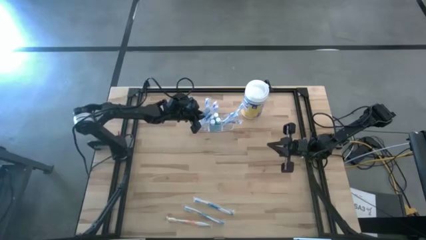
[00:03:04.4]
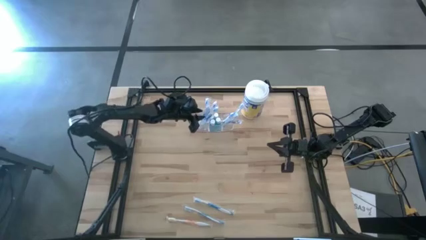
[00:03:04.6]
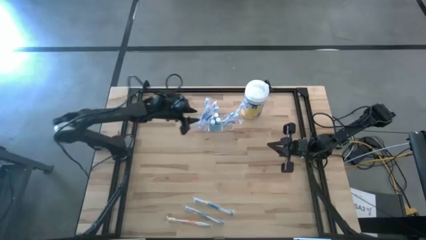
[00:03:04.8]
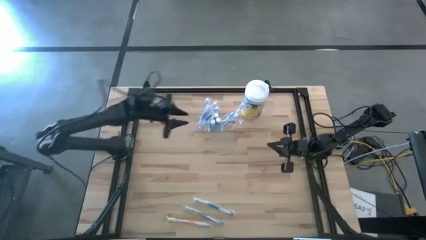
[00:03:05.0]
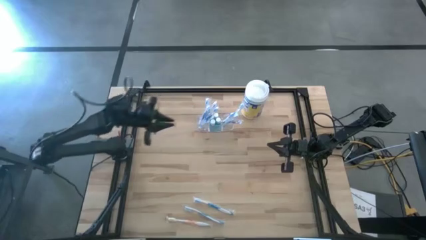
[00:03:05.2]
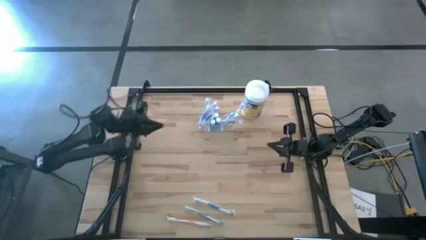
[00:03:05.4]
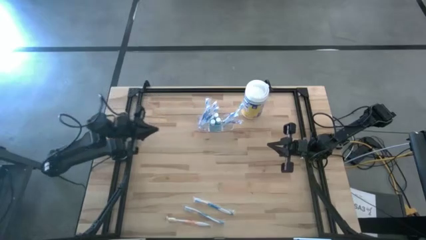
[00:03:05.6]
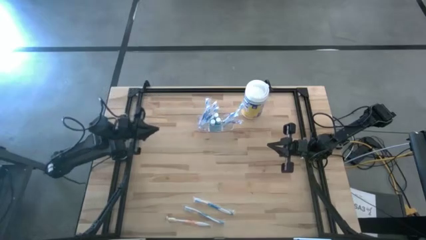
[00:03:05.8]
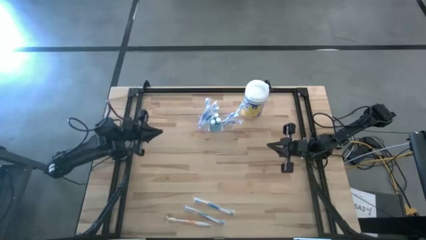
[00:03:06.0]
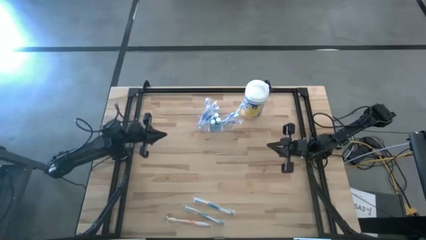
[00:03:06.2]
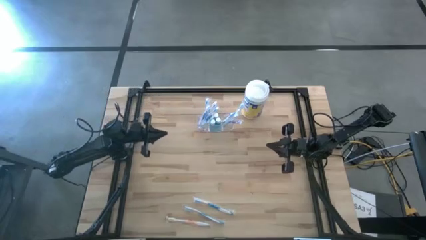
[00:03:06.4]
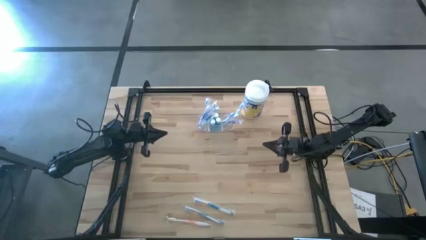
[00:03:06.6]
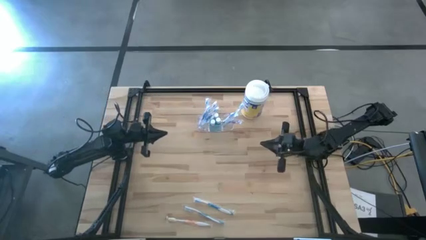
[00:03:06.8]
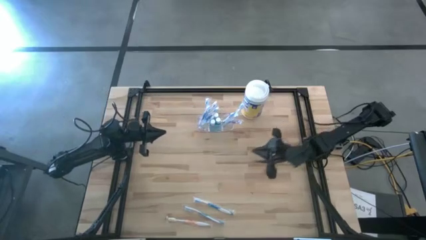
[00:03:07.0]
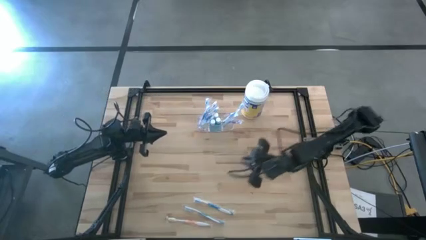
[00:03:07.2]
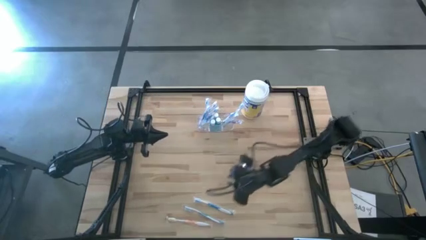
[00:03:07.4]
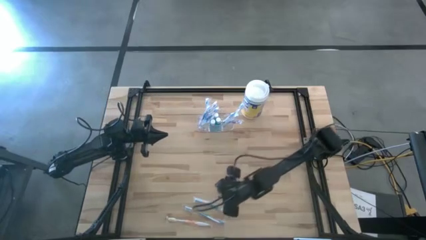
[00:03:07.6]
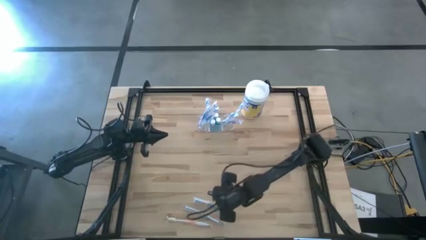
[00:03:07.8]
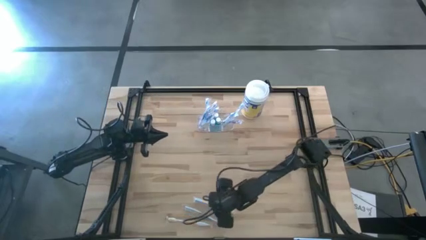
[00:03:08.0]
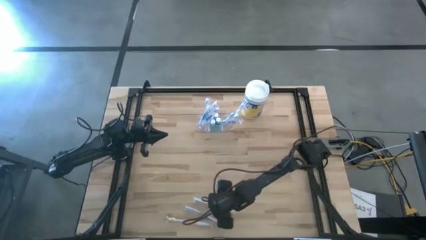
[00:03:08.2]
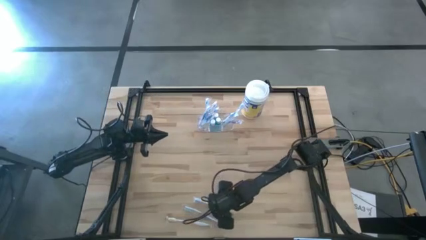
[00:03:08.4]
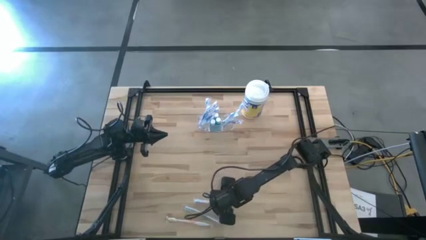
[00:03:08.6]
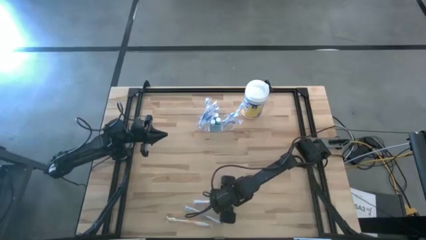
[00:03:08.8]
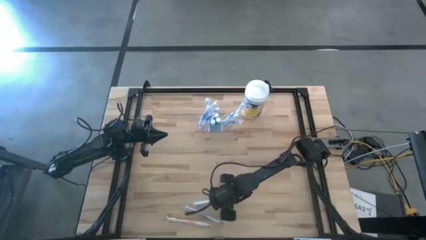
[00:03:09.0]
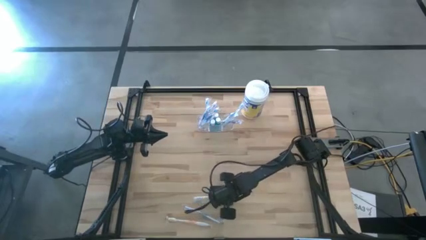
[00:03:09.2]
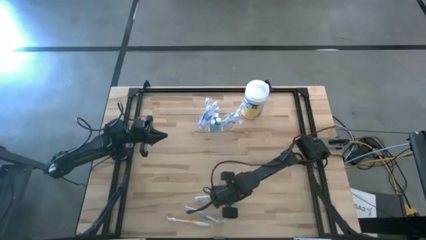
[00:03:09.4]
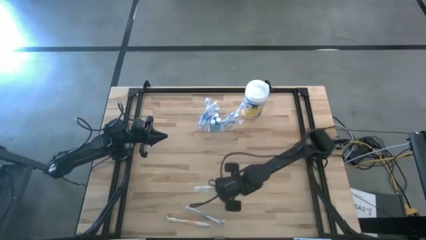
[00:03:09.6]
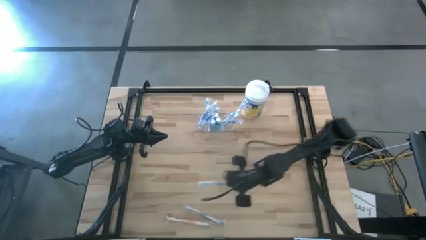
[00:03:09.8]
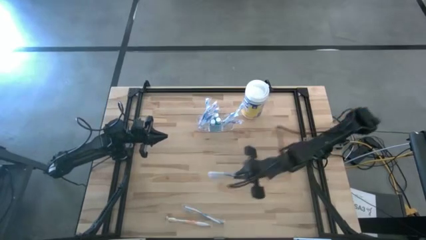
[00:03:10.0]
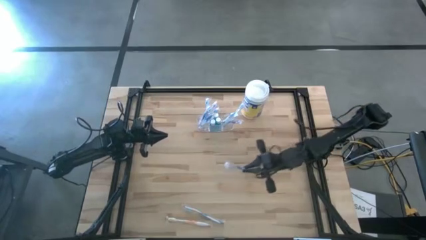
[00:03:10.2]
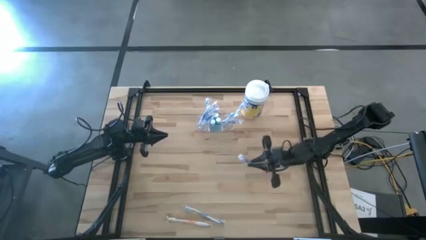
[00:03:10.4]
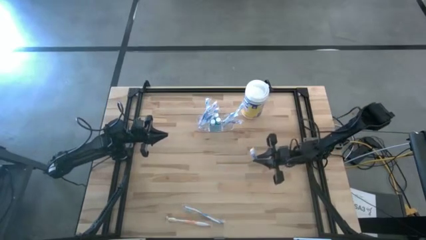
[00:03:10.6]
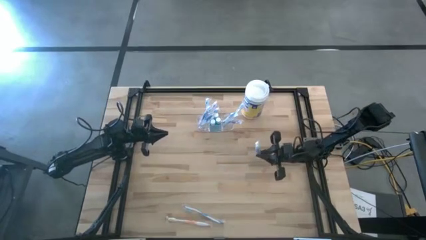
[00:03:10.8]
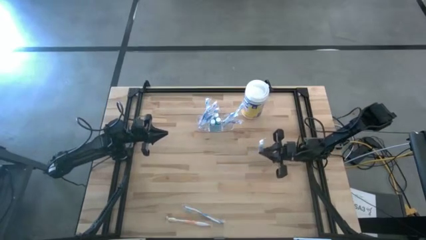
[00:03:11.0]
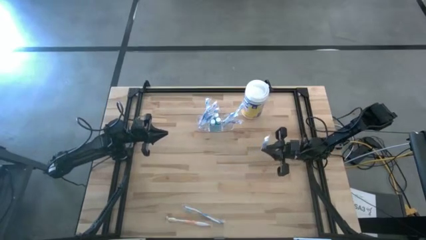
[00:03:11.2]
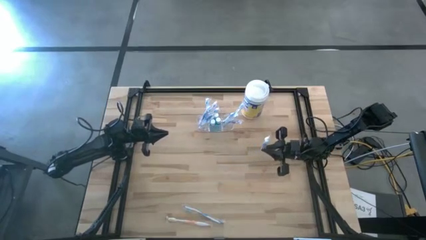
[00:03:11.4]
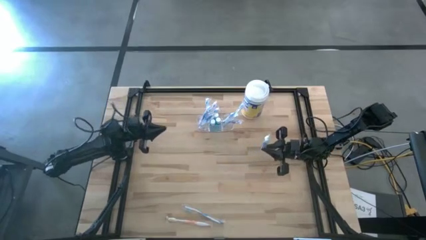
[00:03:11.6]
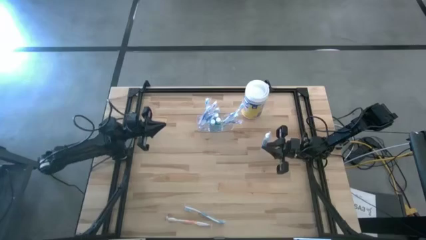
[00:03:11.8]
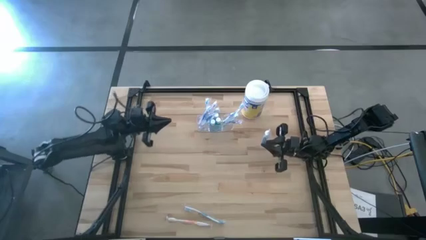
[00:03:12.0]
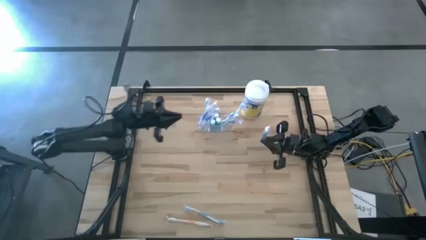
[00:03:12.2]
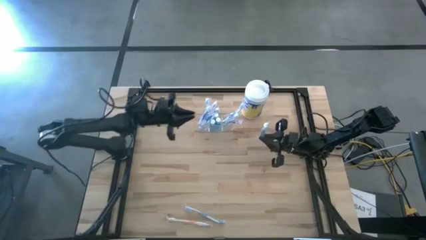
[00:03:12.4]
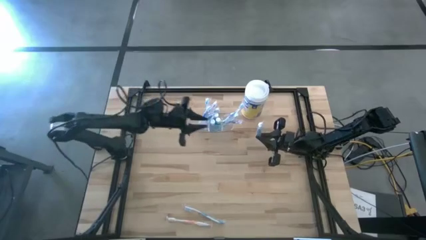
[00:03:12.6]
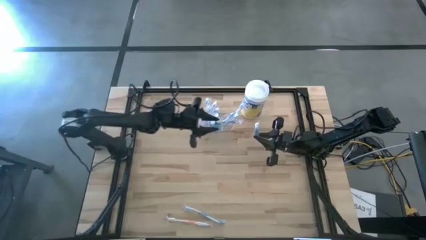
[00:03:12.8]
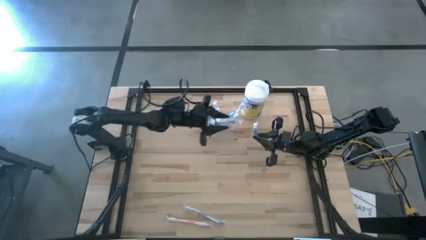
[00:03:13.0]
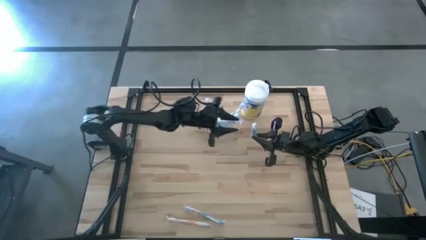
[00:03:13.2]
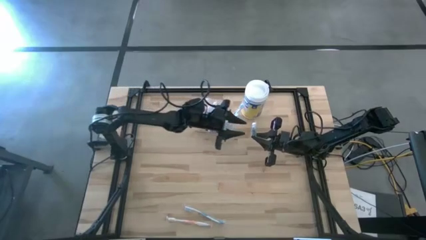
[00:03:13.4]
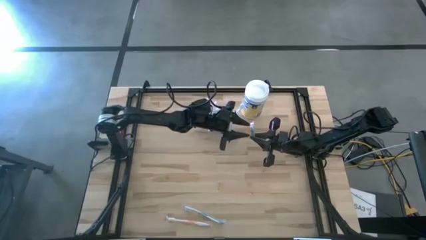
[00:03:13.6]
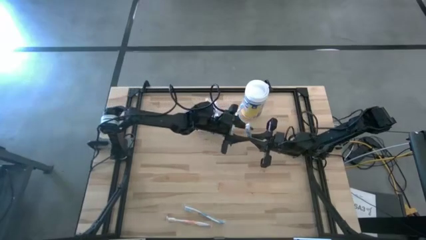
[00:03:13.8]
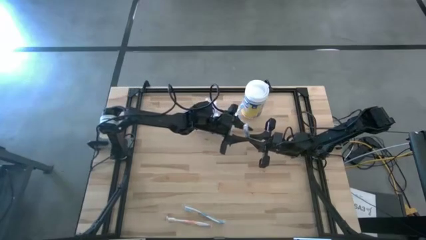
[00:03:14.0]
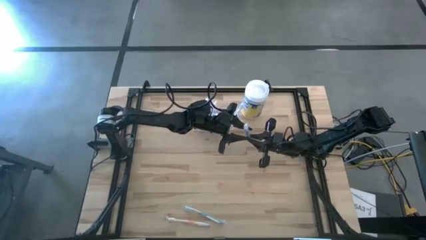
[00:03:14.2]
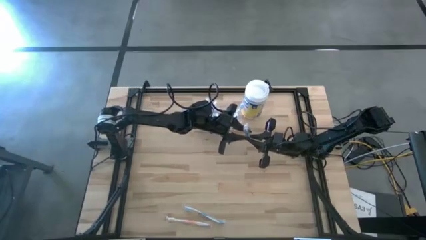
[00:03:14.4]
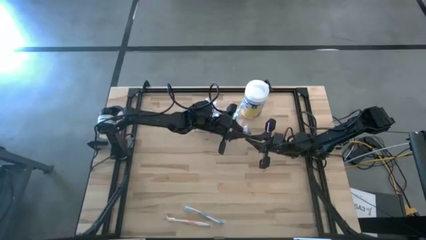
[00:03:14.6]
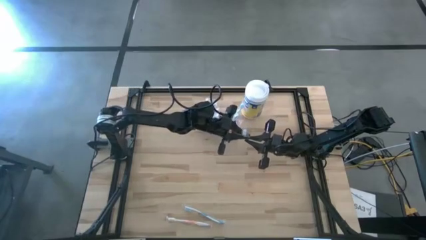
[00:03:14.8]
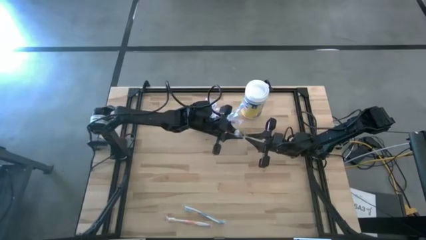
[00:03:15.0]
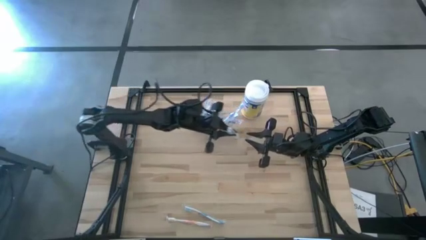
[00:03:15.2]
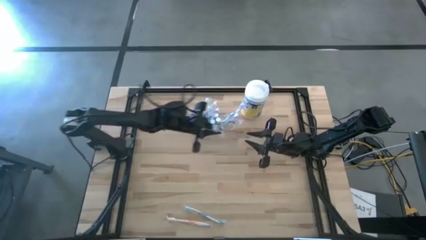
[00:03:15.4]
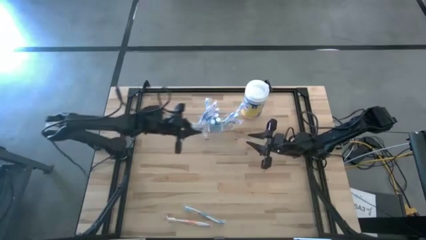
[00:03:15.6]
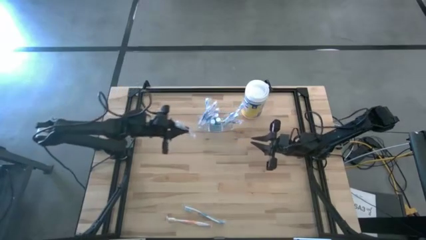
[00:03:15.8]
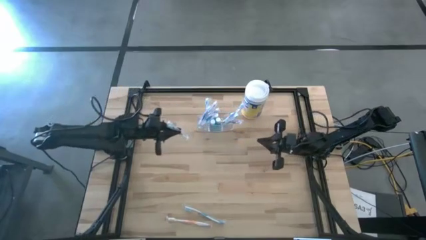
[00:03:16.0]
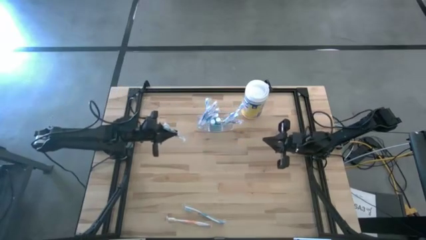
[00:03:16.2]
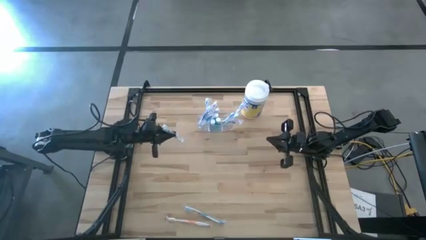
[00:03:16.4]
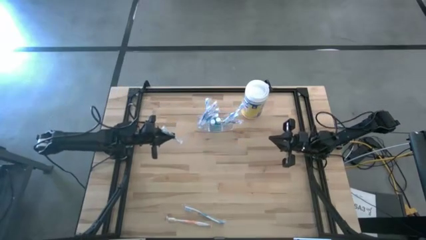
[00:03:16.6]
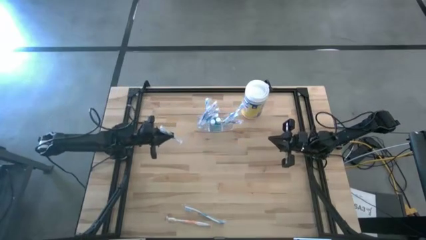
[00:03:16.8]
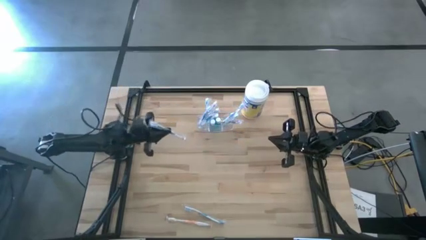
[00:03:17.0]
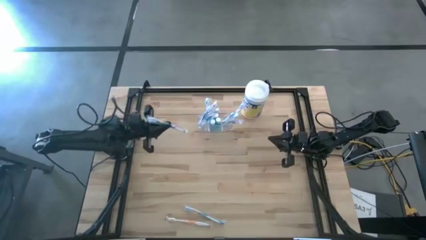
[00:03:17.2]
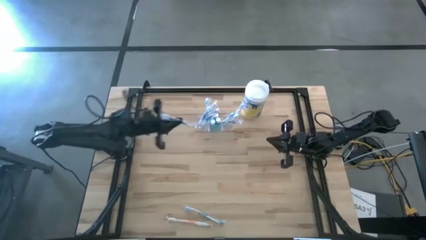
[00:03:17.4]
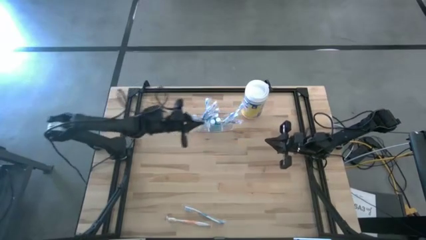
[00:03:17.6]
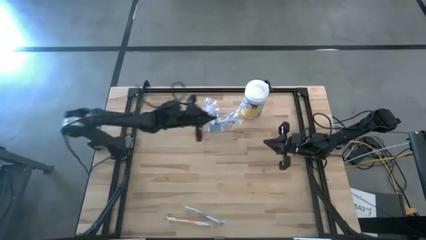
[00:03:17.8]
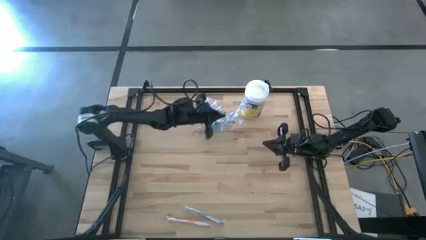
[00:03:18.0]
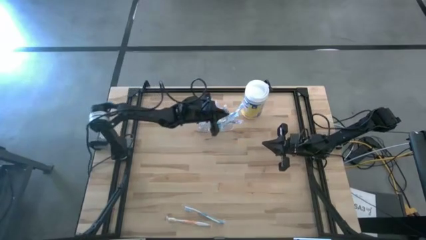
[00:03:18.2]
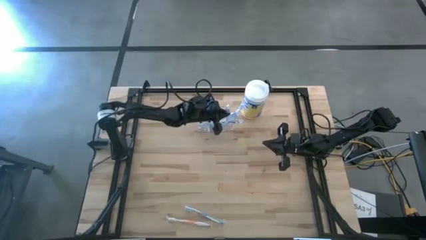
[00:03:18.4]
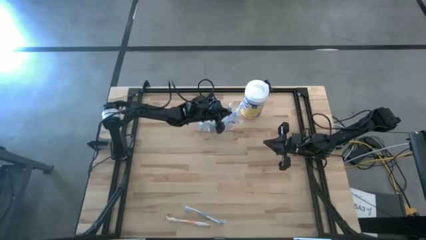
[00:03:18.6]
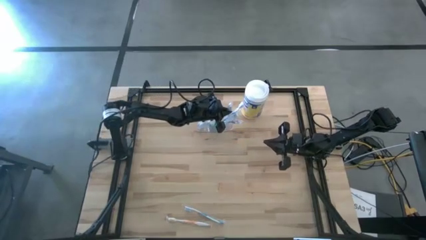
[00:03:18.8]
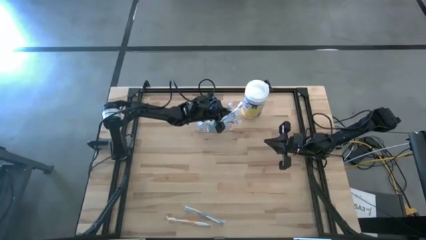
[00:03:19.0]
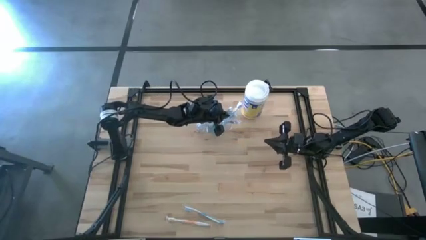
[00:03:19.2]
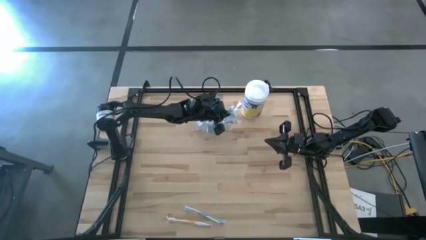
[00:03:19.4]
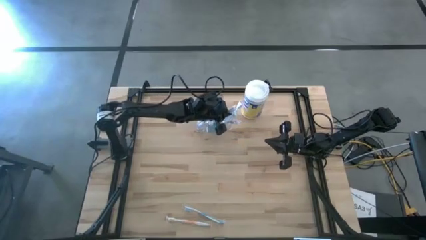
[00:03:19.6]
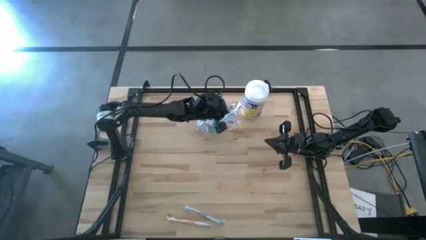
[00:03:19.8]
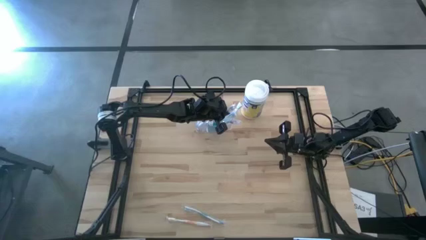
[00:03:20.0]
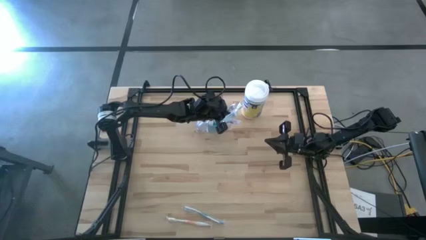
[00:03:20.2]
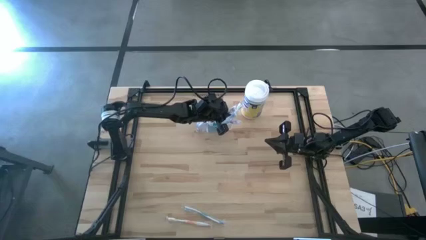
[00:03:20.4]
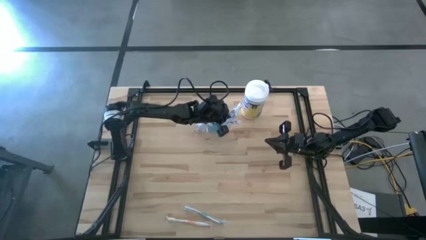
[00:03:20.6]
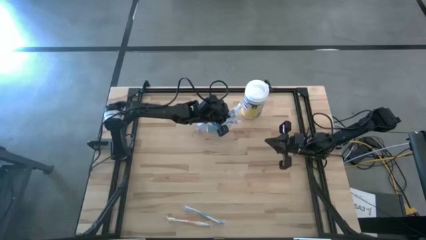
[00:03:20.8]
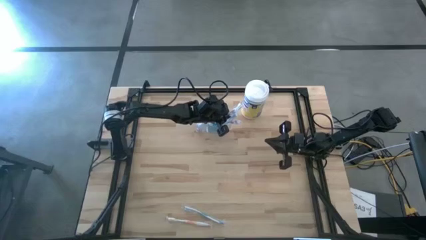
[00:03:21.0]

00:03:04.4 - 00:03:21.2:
Task: Pick & Place toothbrushing station
Put the blue toothbrush into the right section of the transparent organizer

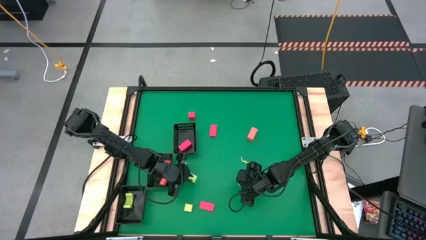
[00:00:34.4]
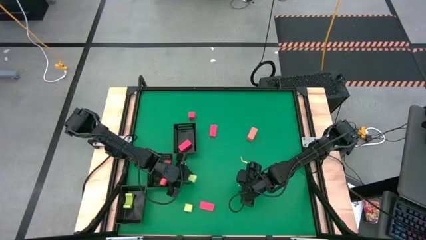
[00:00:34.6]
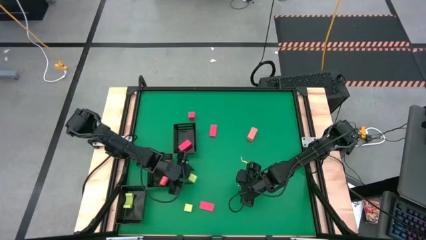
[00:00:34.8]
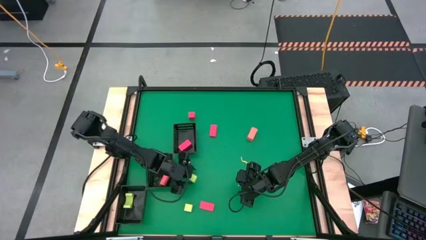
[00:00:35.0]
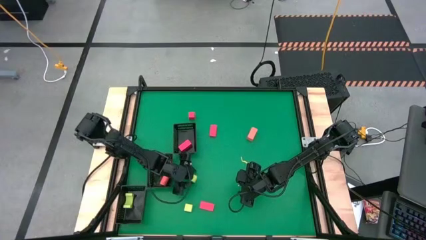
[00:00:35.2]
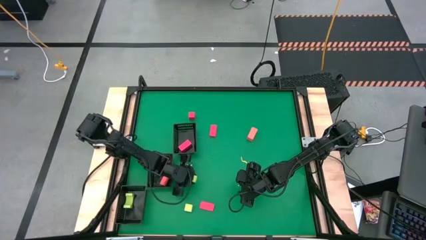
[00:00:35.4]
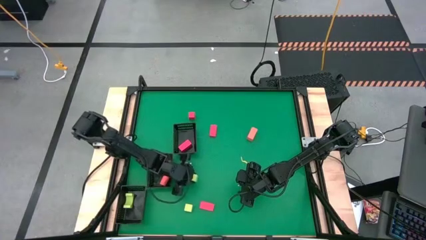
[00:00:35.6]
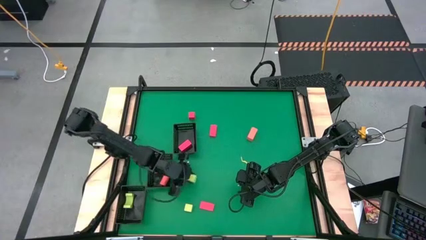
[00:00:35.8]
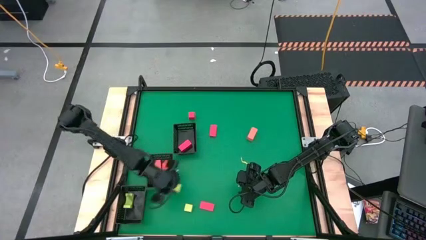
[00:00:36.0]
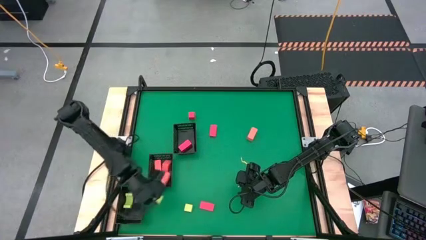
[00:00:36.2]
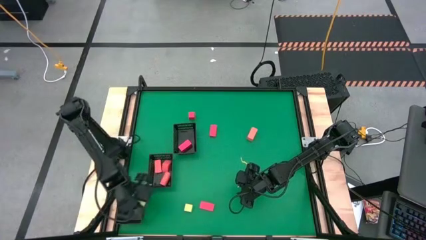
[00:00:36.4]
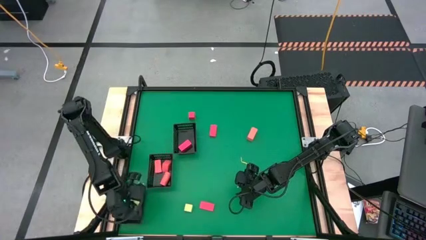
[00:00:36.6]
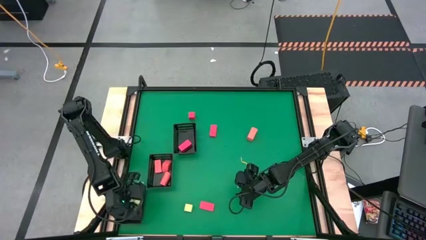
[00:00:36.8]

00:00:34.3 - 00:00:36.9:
Task: Sort & place blocks by color
Put the green block into the bottom black bin
